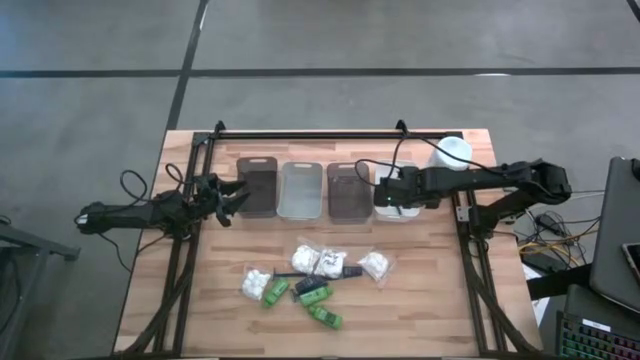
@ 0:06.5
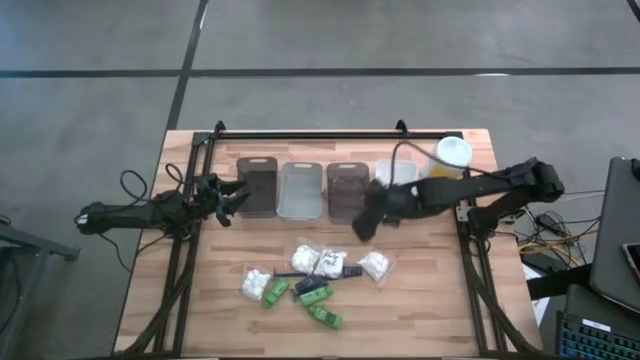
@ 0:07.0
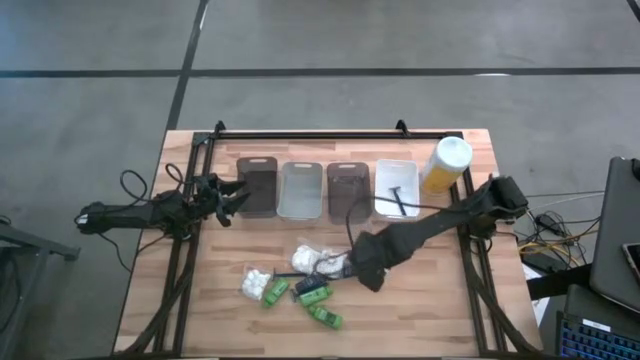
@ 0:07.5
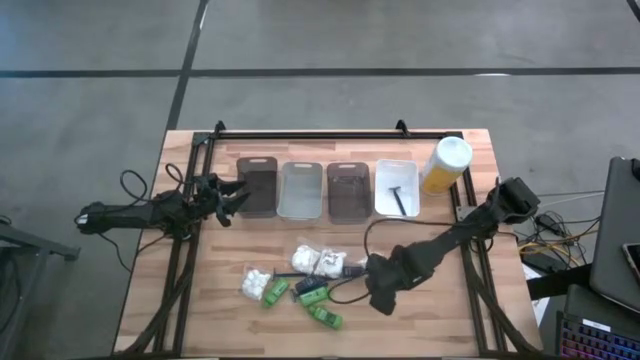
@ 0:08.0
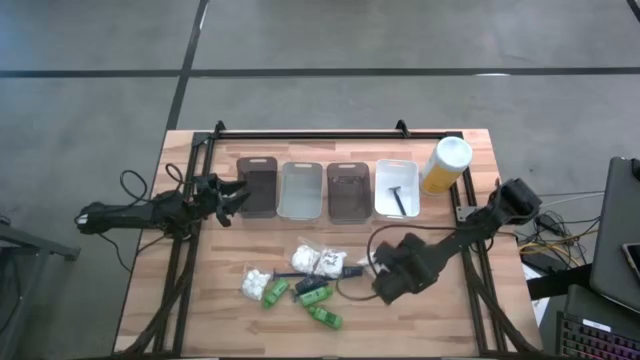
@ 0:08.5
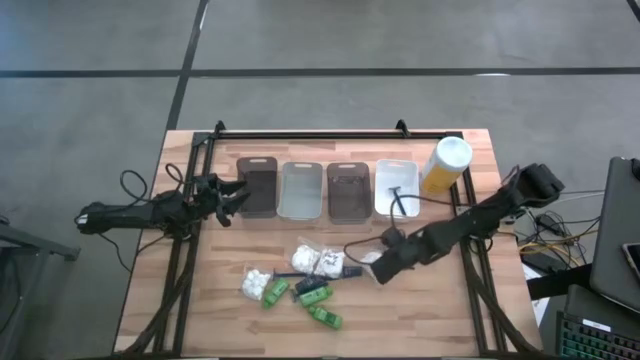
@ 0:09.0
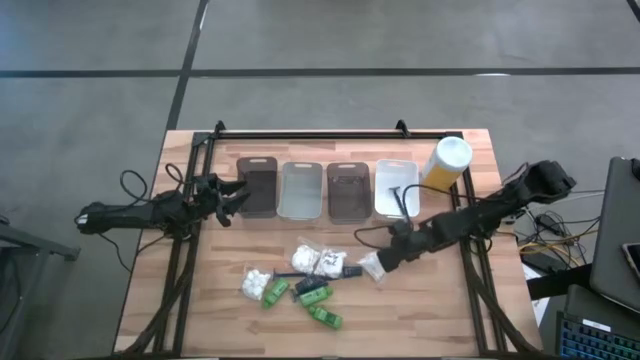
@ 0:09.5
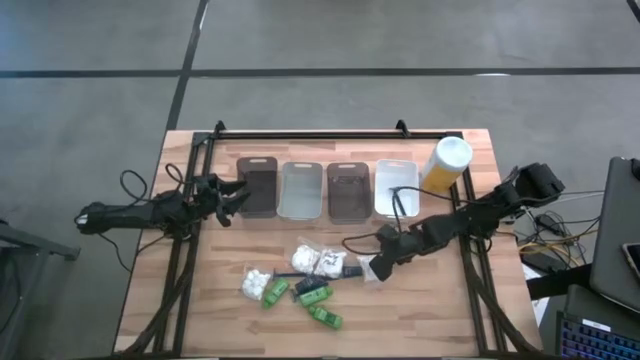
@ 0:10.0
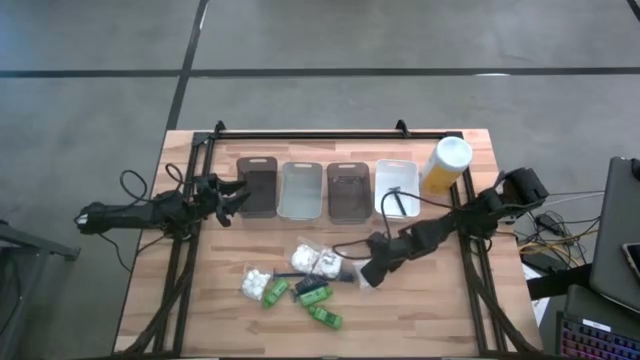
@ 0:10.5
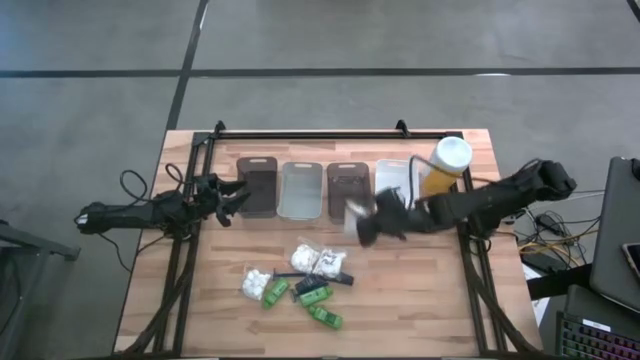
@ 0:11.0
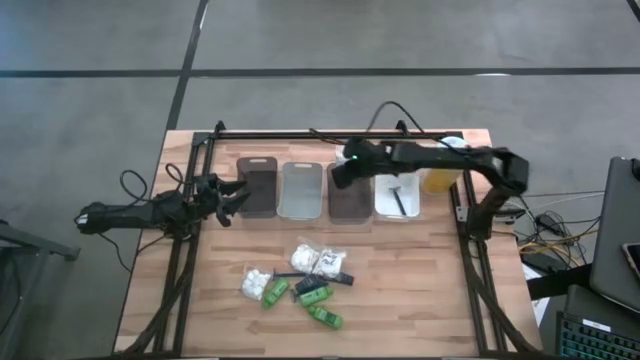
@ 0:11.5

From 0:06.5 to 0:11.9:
Task: Pick & Place Travel size toiletries
Put the white cotton pack into the right black bin

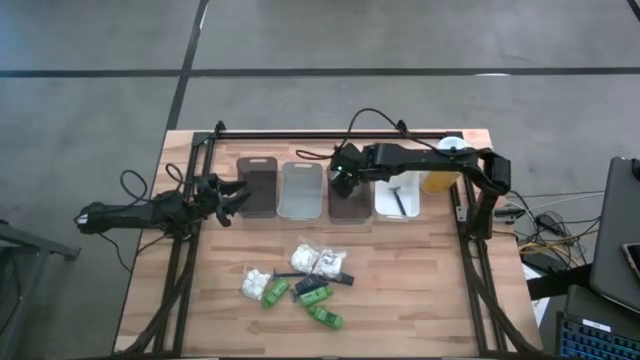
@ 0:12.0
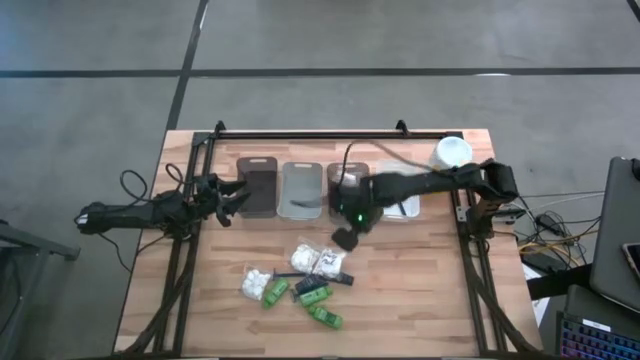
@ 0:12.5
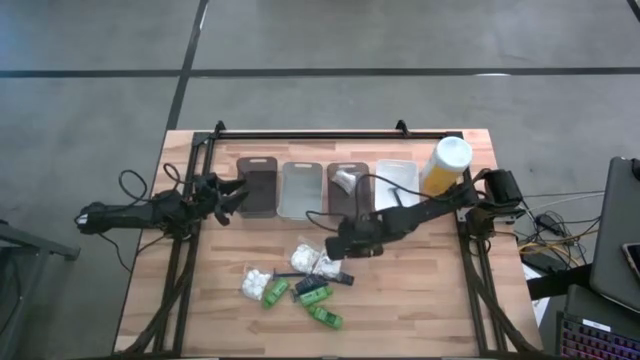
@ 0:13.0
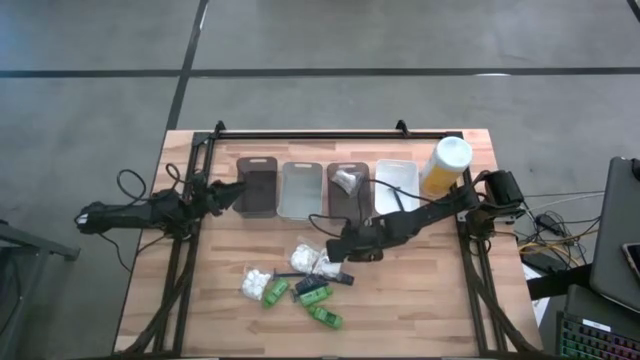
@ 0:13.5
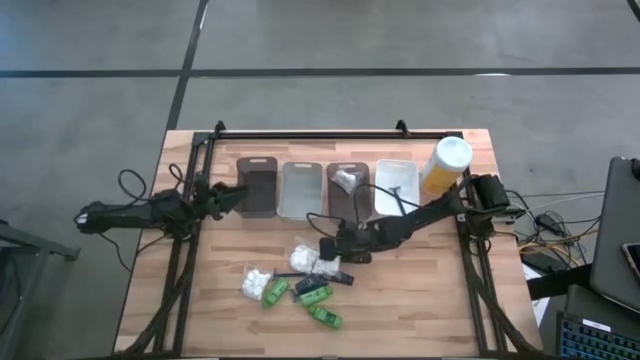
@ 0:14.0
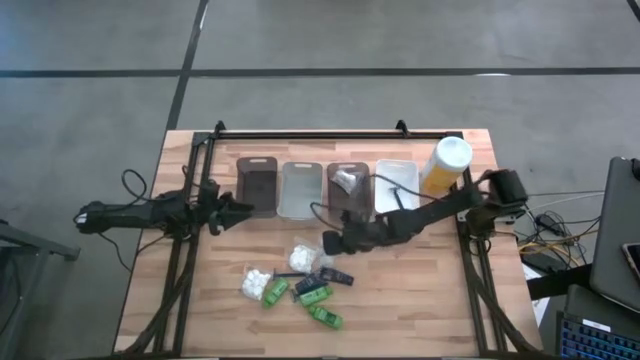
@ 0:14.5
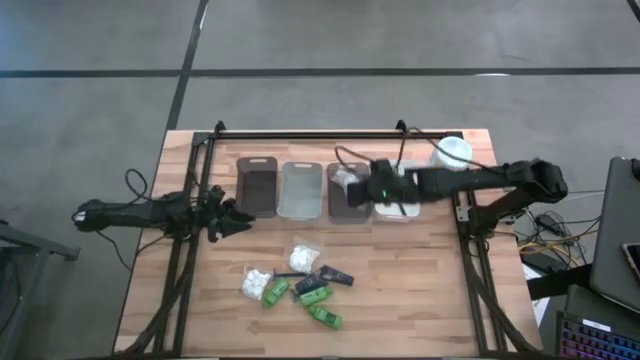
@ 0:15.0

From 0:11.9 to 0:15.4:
Put the white cotton pack into the right black bin

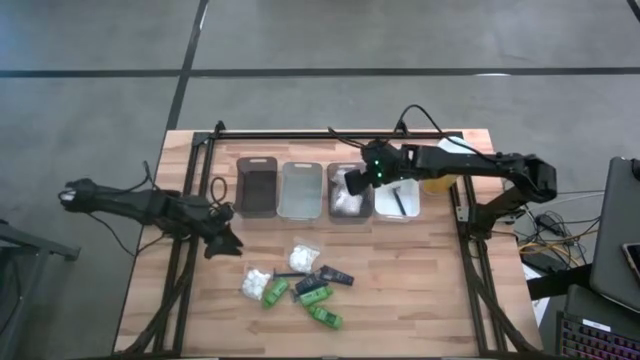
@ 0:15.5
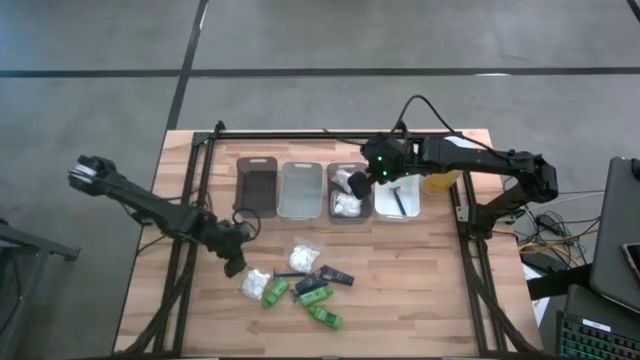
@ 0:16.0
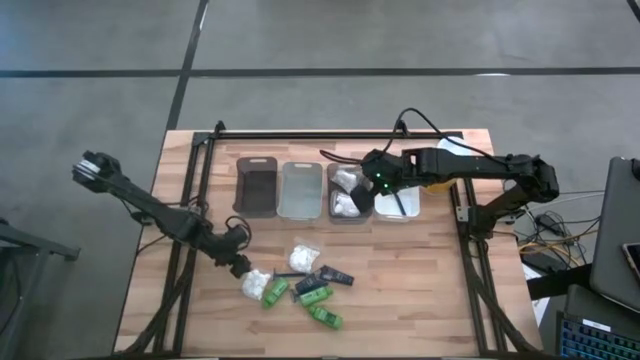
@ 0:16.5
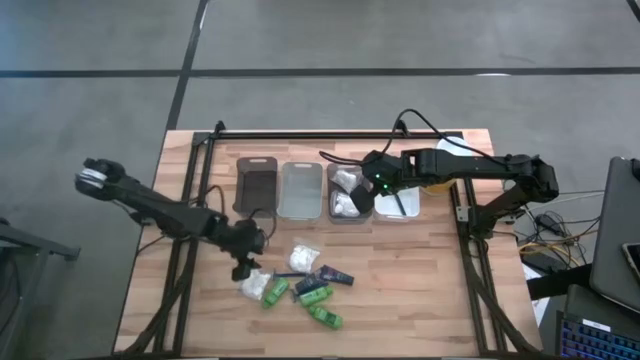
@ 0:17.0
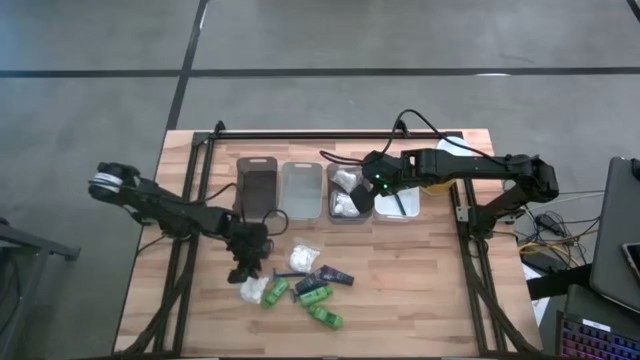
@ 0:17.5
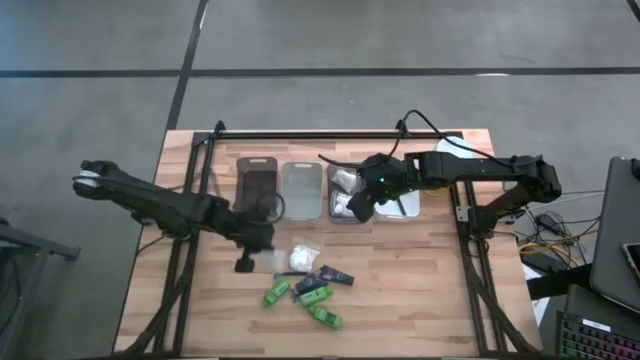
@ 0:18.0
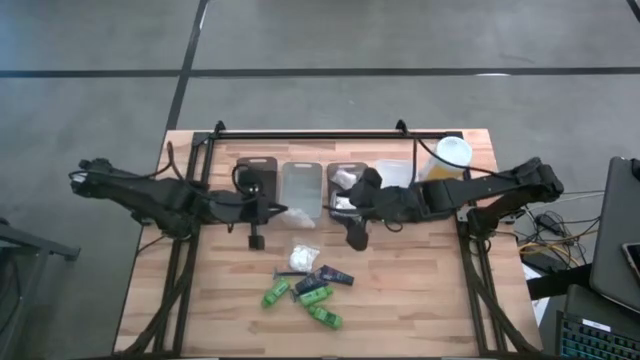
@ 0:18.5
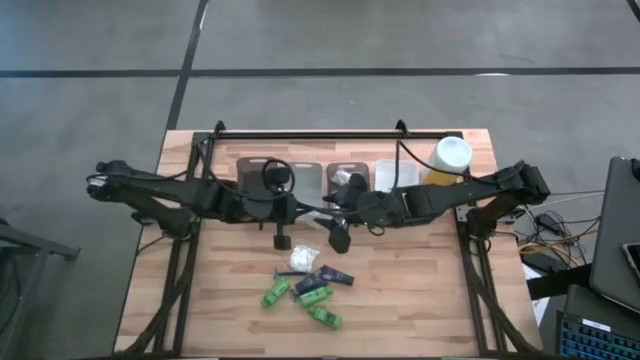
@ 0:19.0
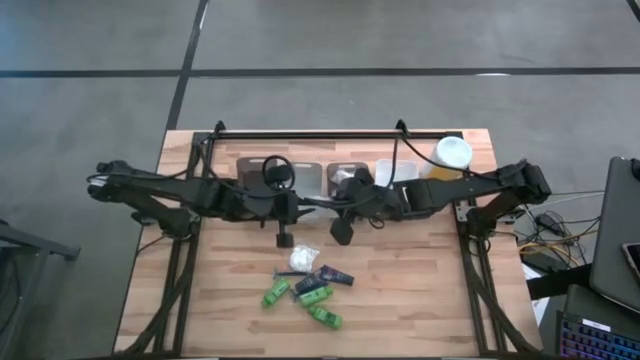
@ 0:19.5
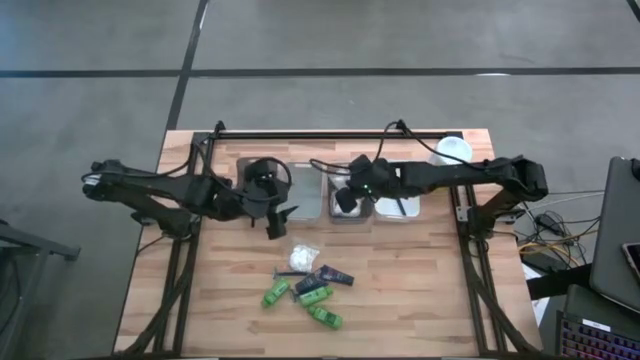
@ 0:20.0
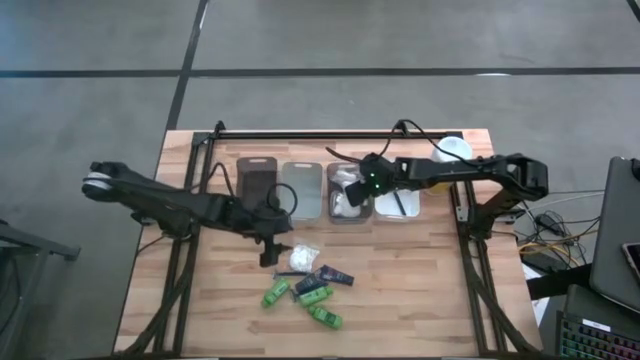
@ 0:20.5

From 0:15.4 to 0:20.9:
Put the white cotton pack into the right black bin

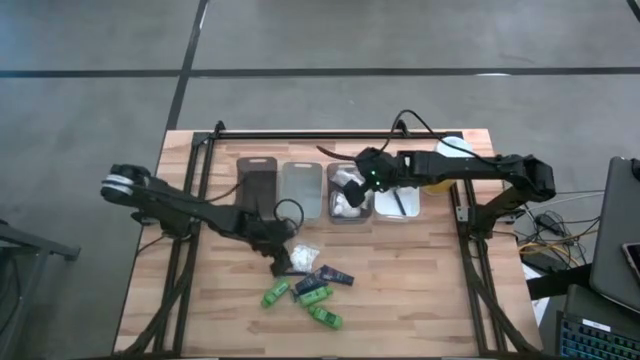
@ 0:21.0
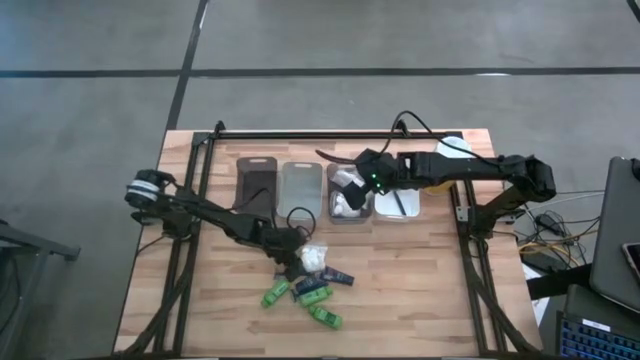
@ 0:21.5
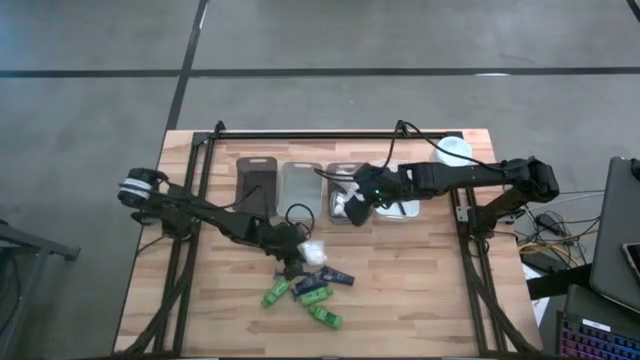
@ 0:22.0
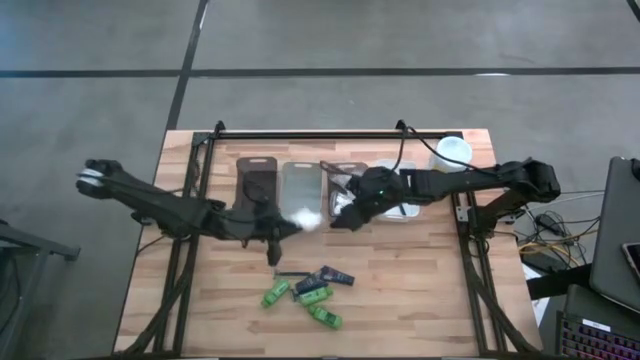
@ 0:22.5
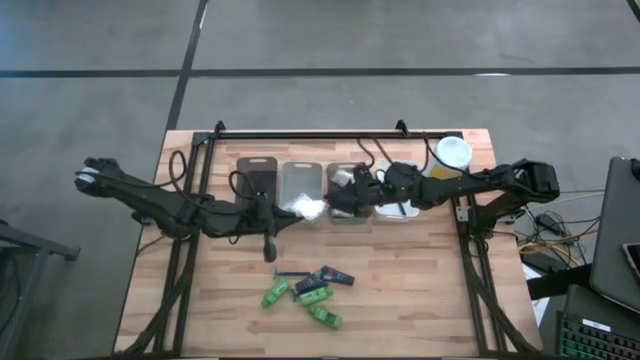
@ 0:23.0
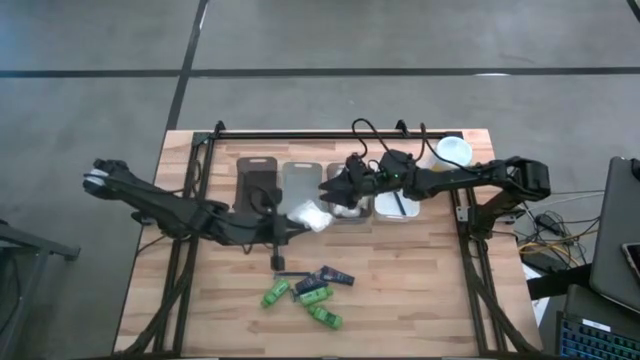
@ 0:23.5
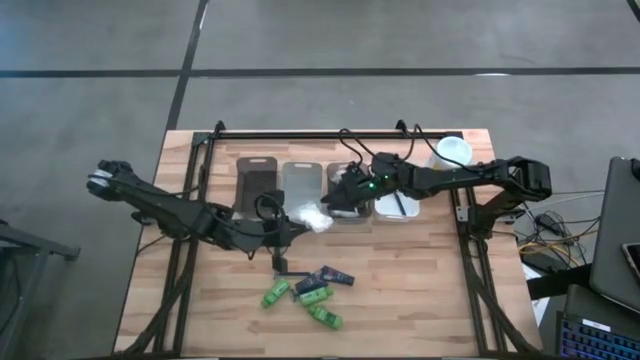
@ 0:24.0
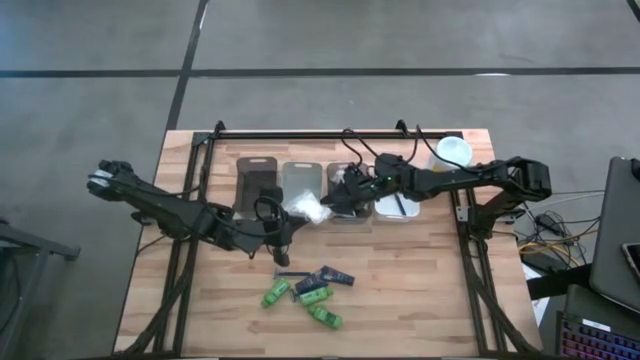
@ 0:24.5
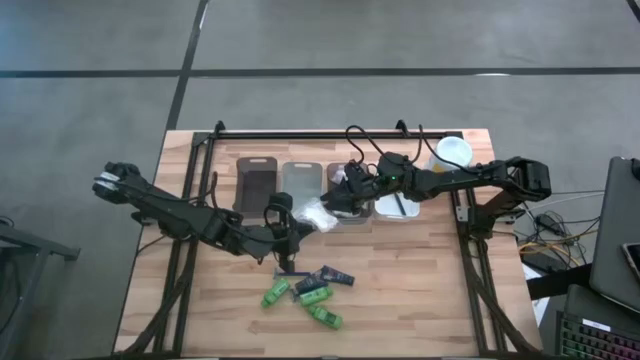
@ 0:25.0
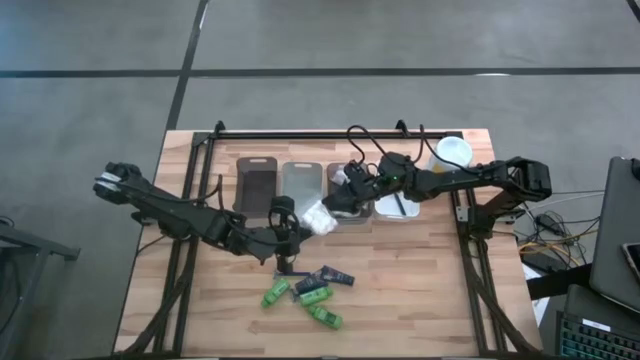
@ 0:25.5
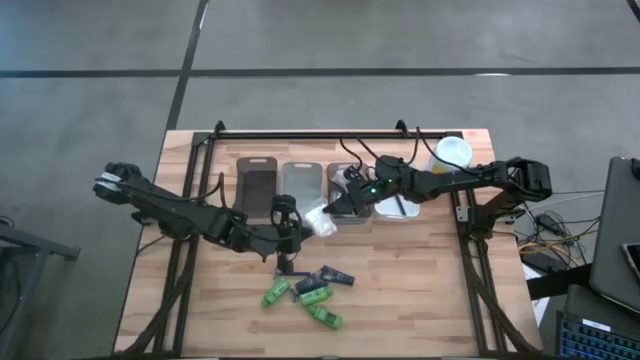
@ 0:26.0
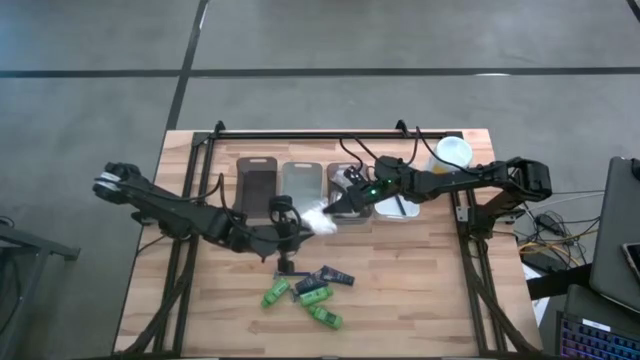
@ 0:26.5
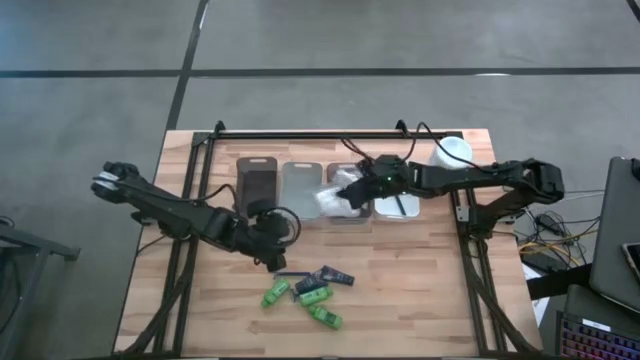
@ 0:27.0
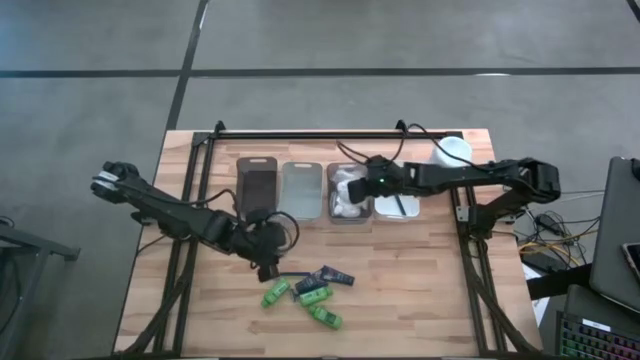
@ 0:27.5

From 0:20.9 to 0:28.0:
Put the white cotton pack into the right black bin
